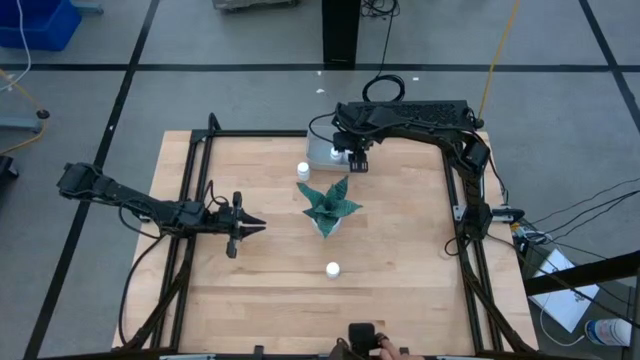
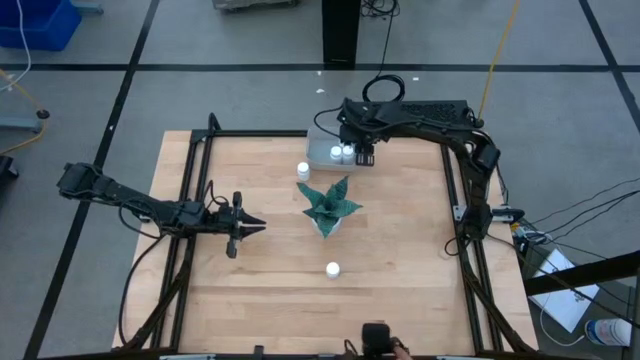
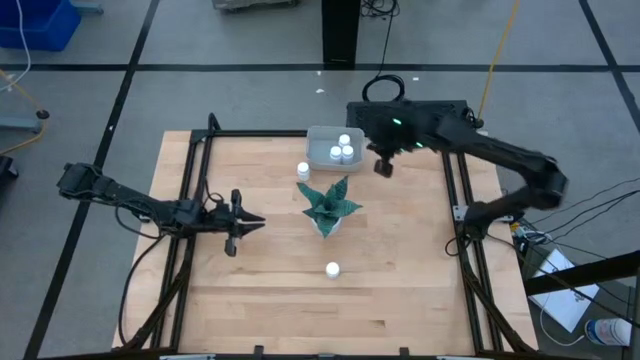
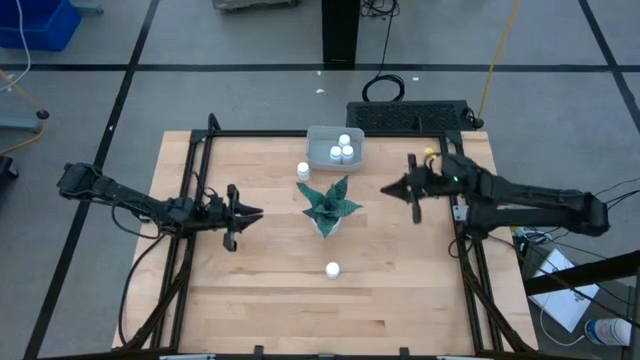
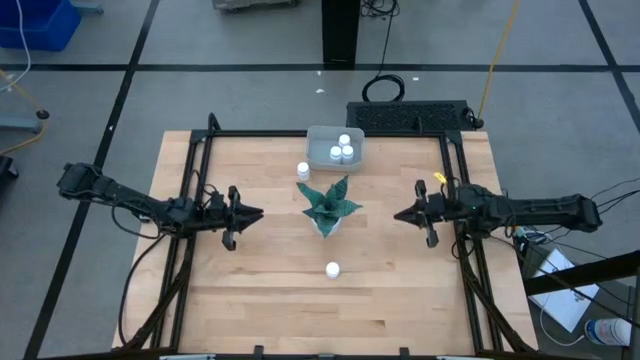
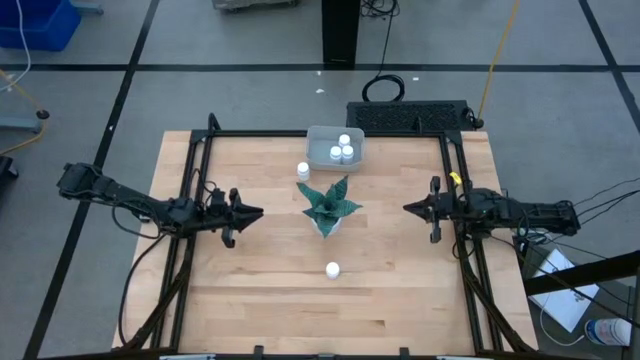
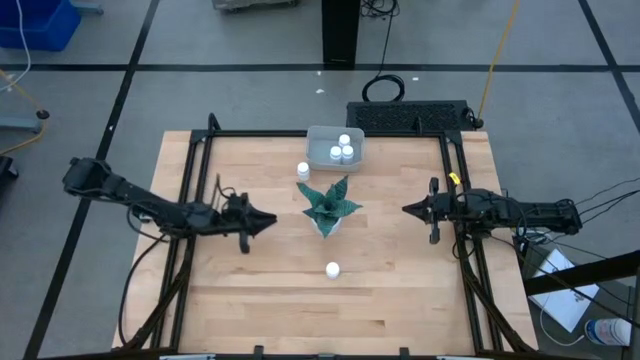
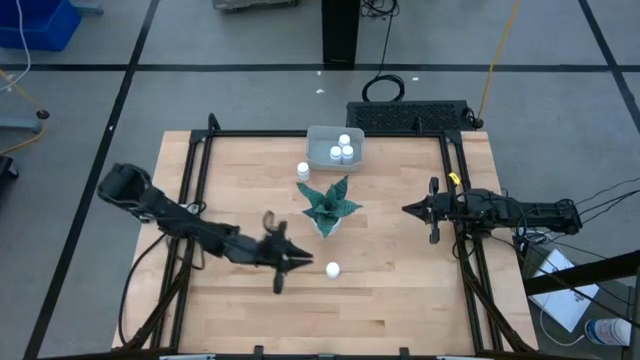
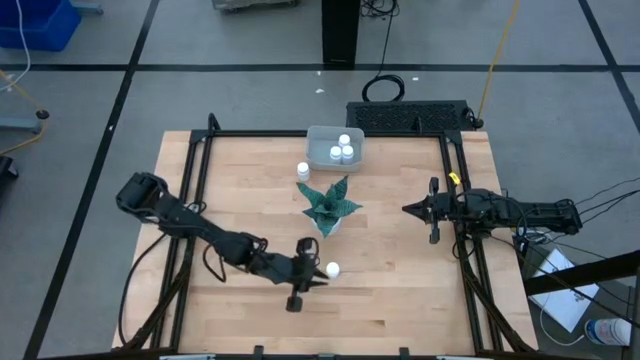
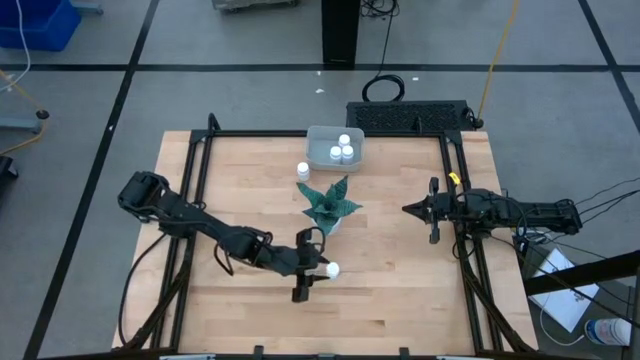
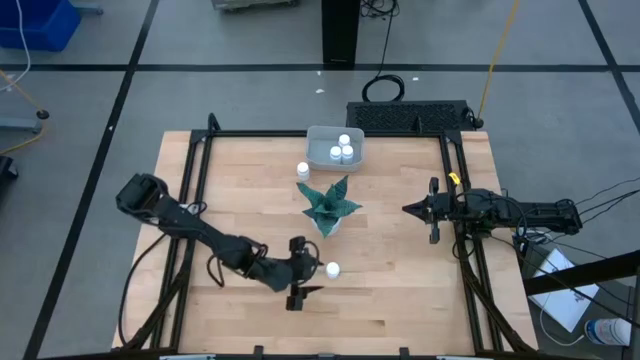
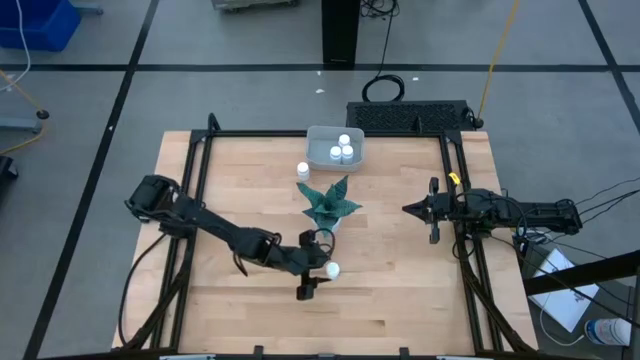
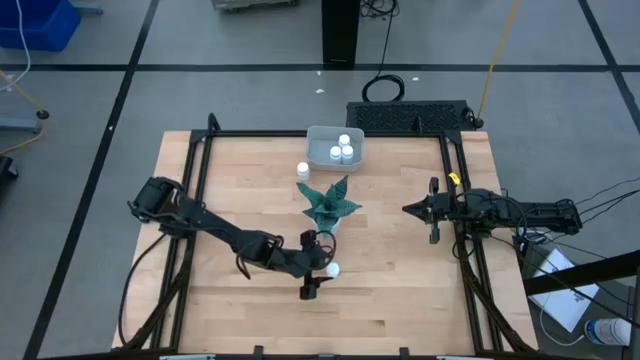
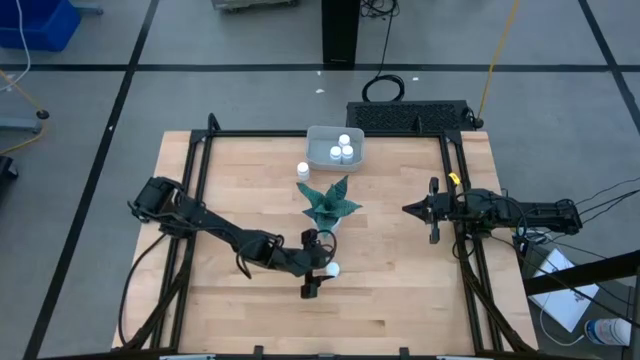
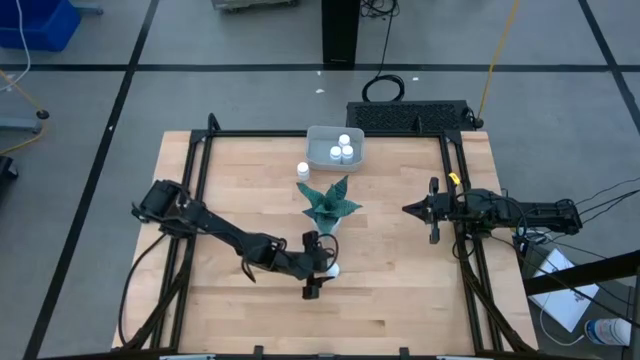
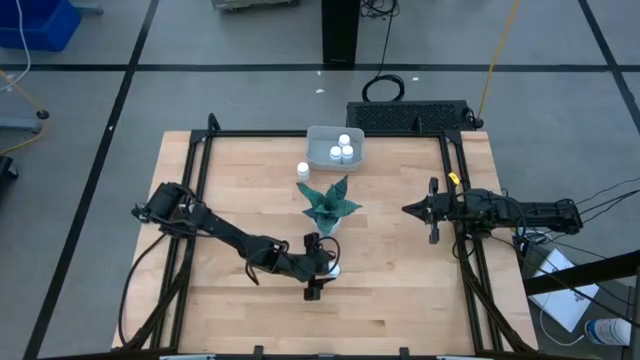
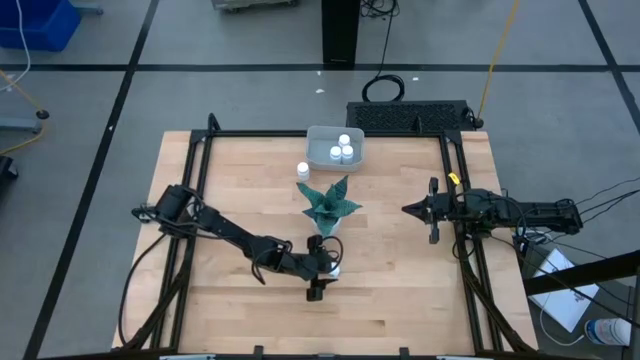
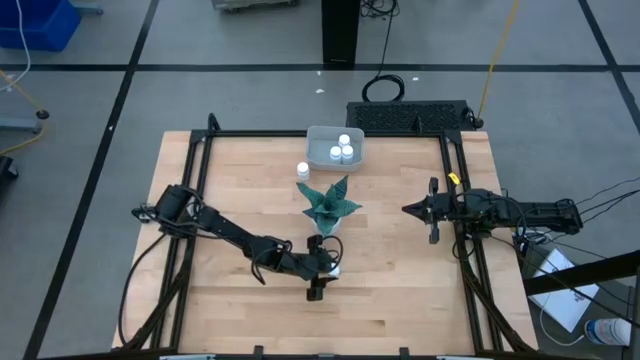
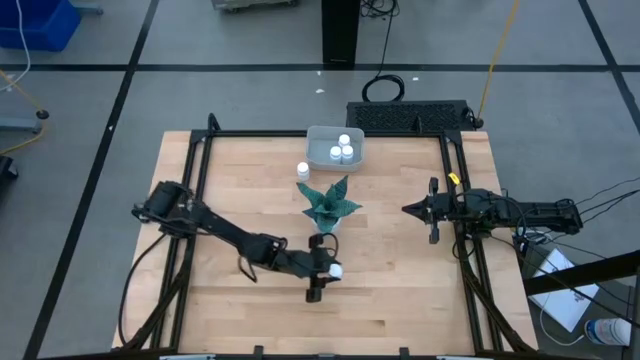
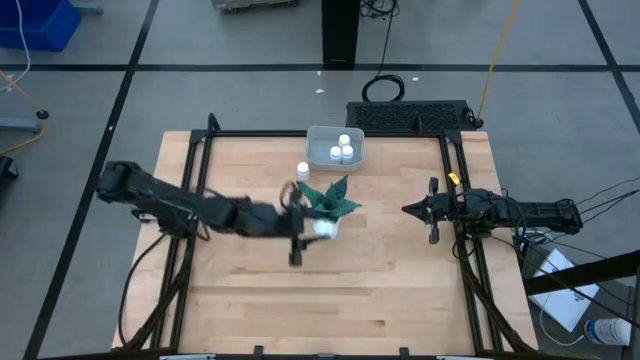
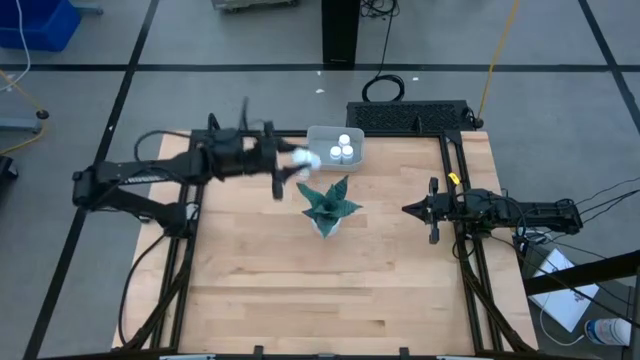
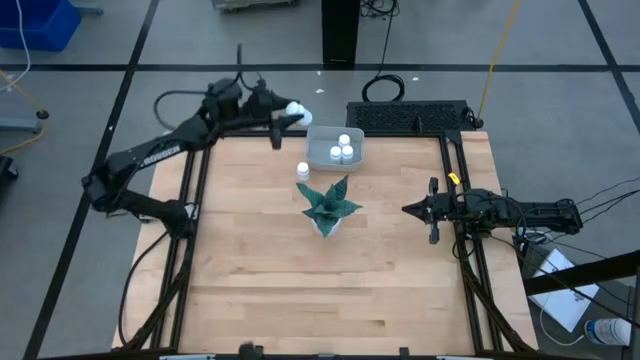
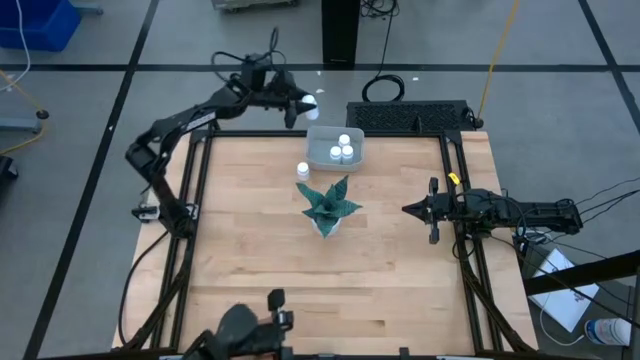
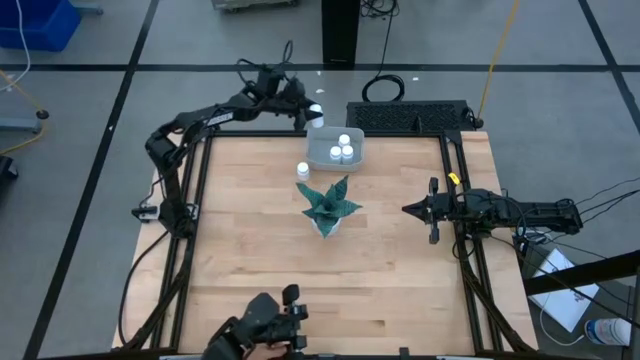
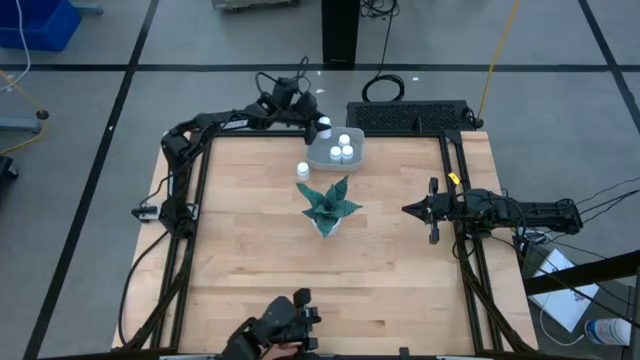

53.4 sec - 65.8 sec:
Task: Pick and place pill bottles into a basket
Put the white medicine bottle into the gray bin

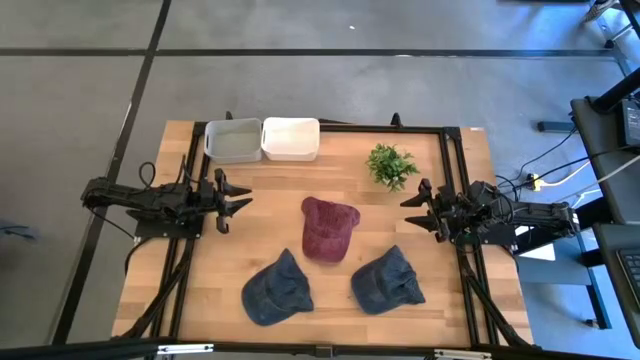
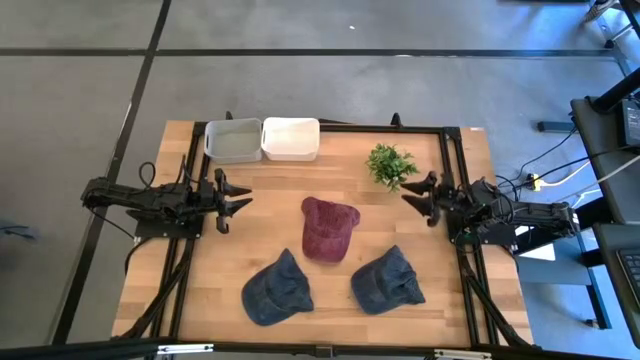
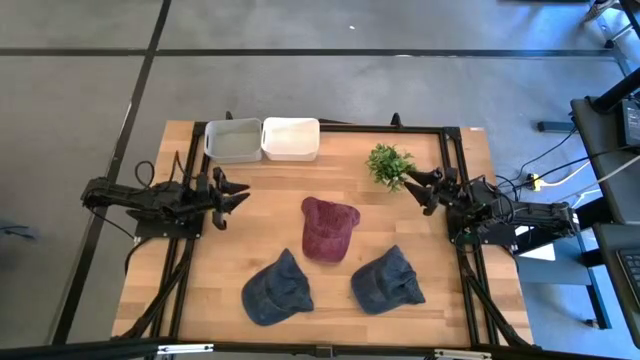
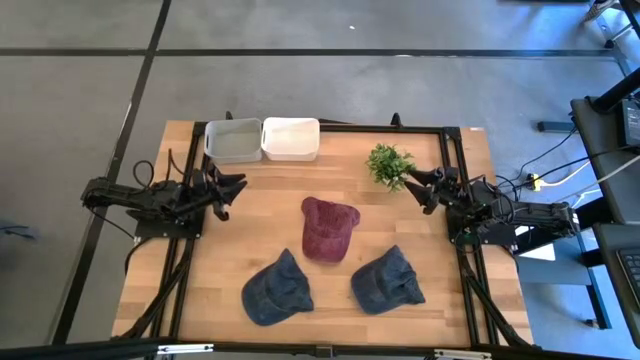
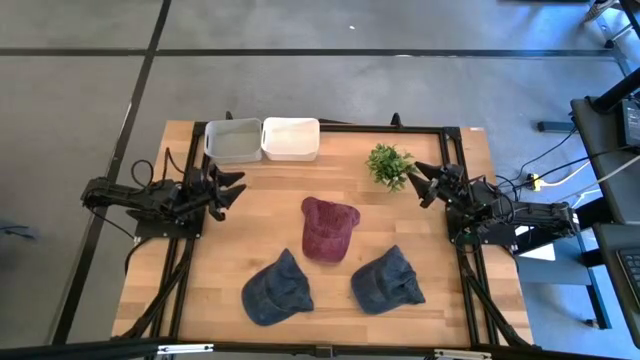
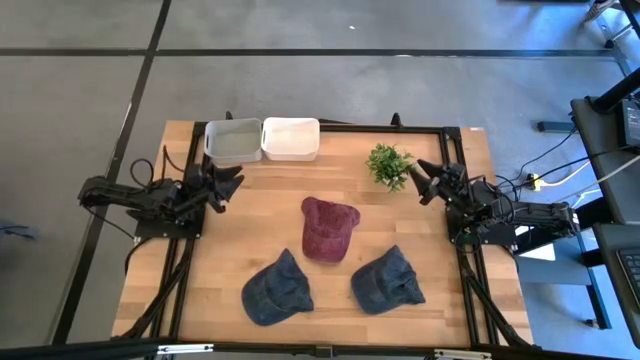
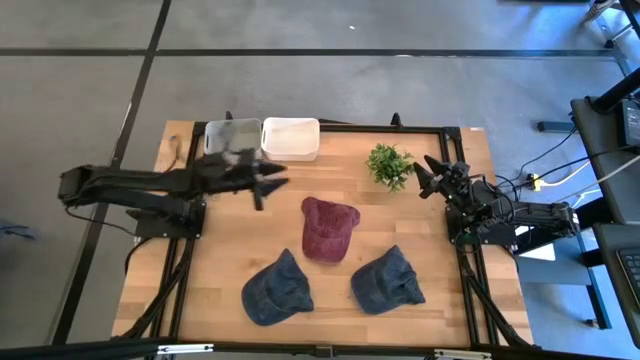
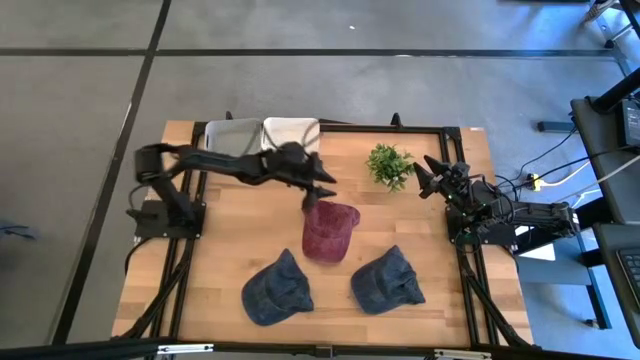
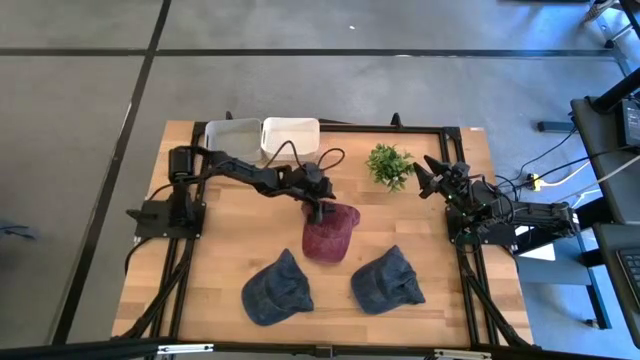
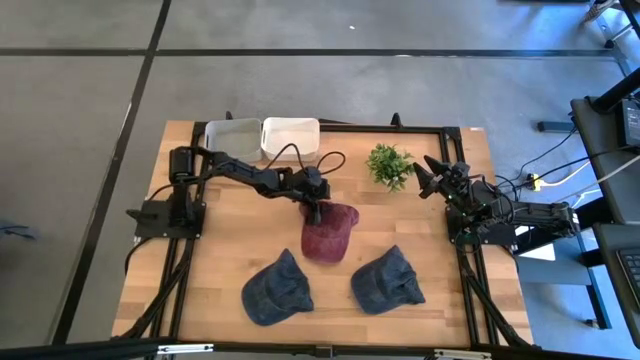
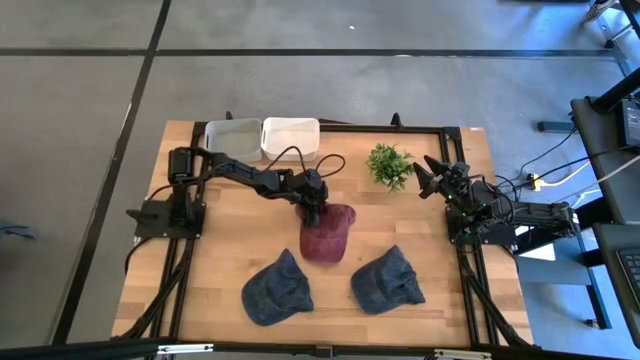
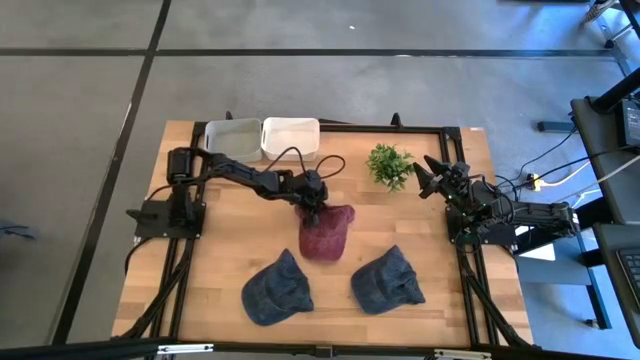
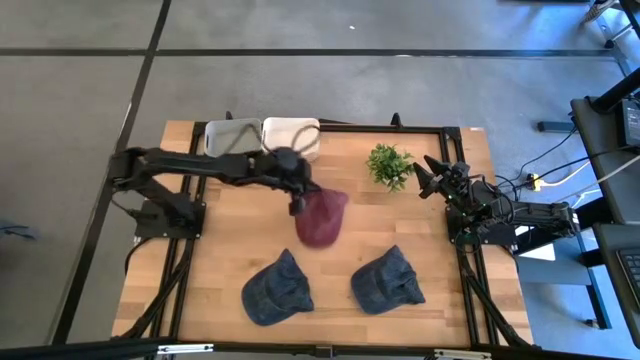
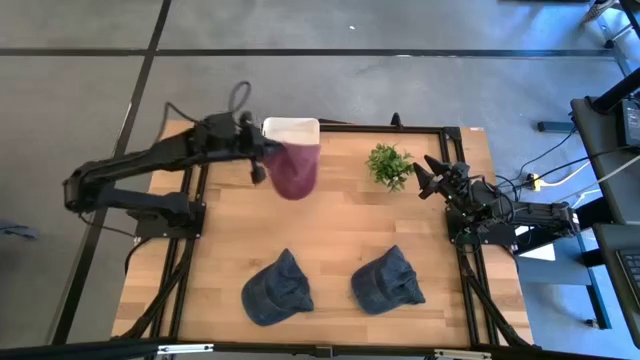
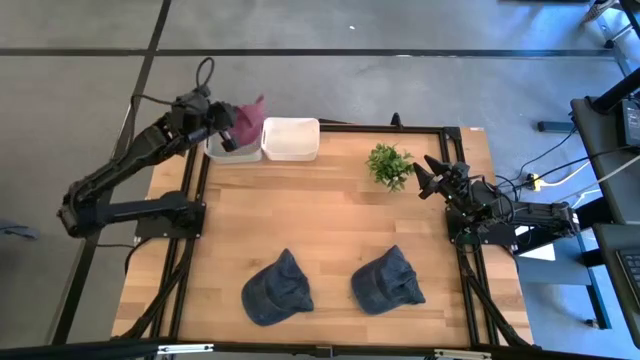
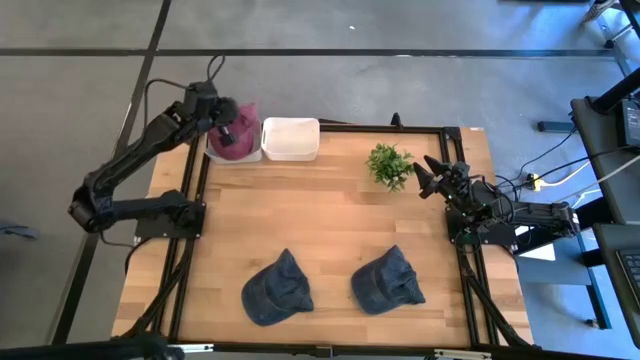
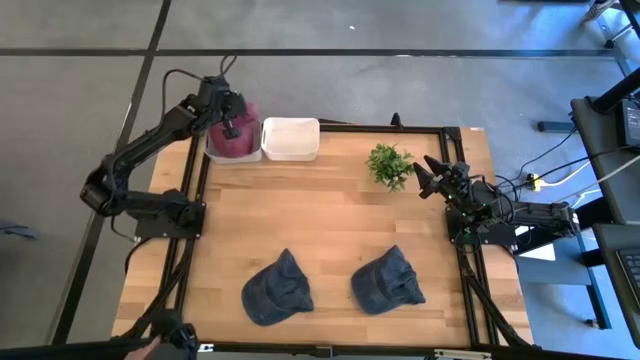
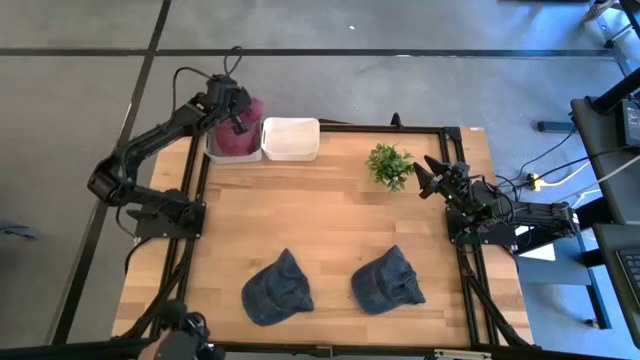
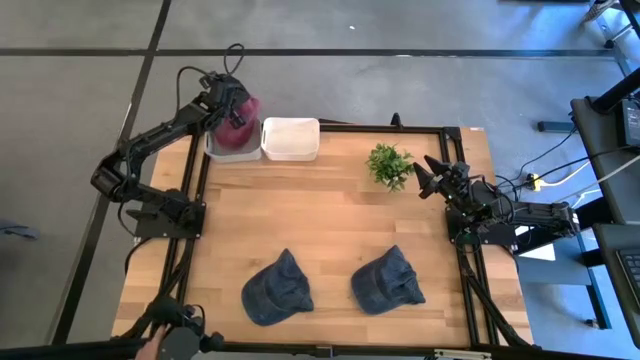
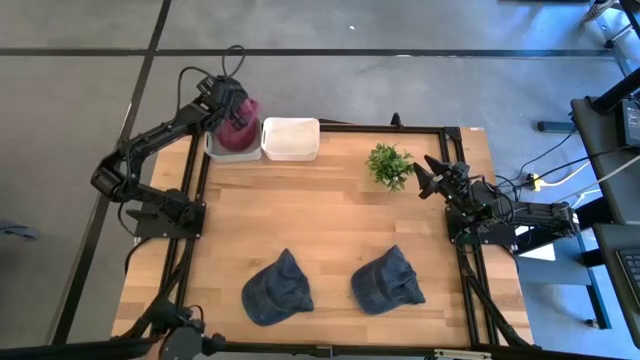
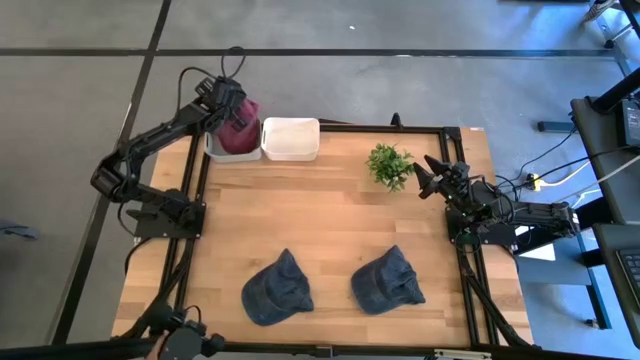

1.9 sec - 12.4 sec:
Task: Pick & Place hat
Put the red cap into the gray bin
